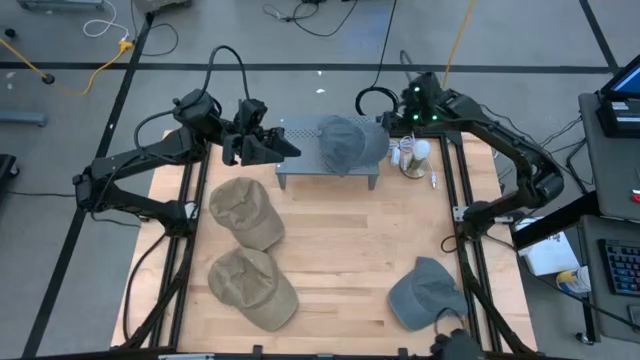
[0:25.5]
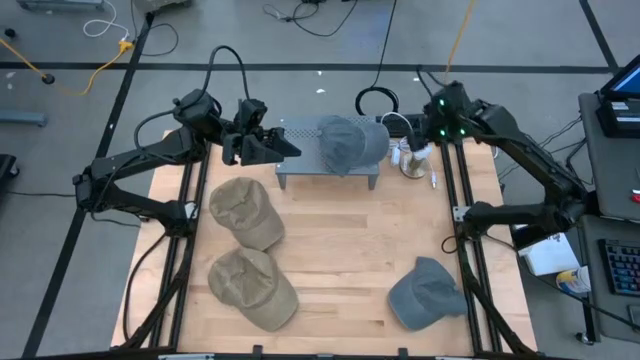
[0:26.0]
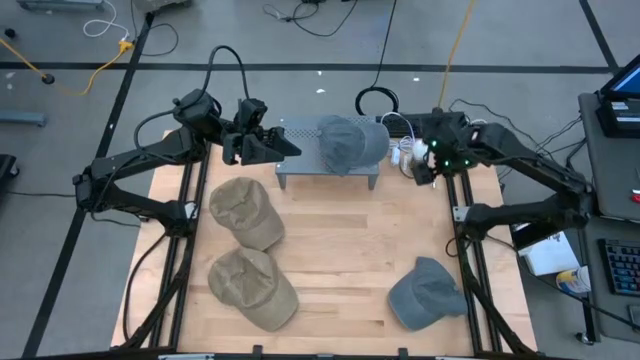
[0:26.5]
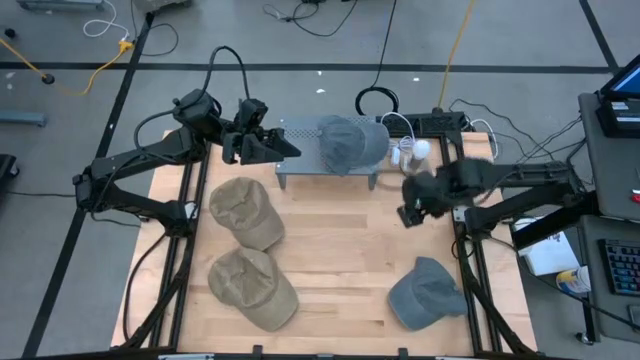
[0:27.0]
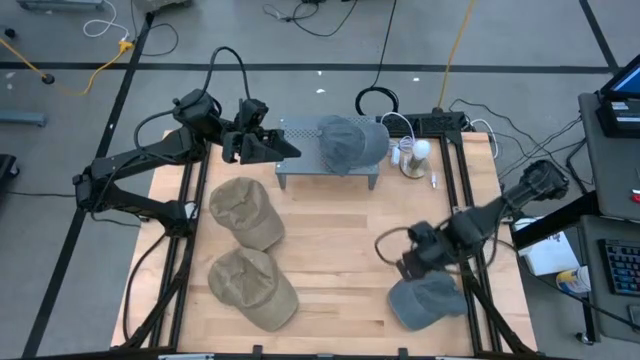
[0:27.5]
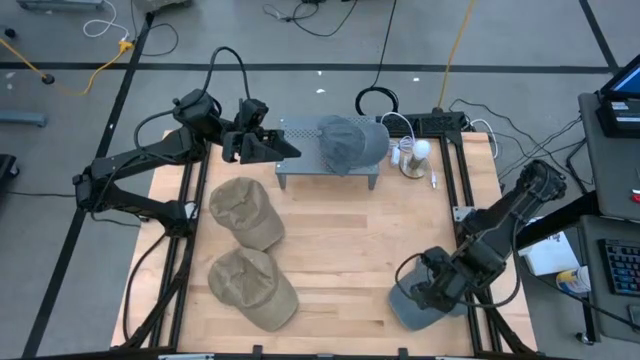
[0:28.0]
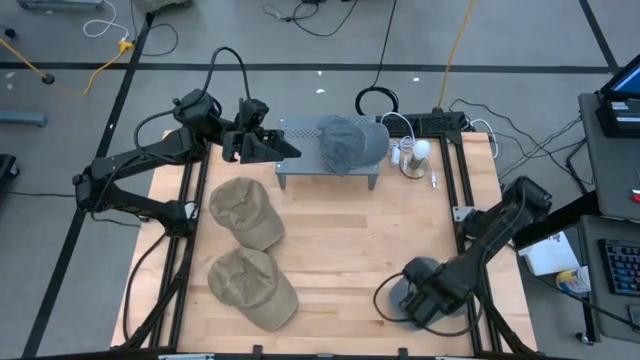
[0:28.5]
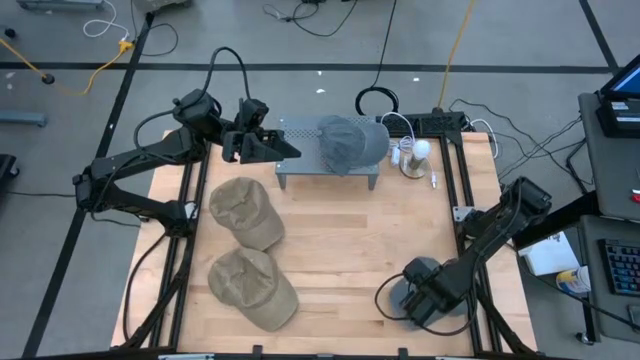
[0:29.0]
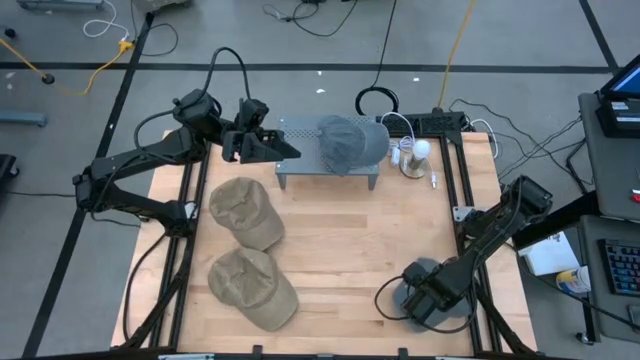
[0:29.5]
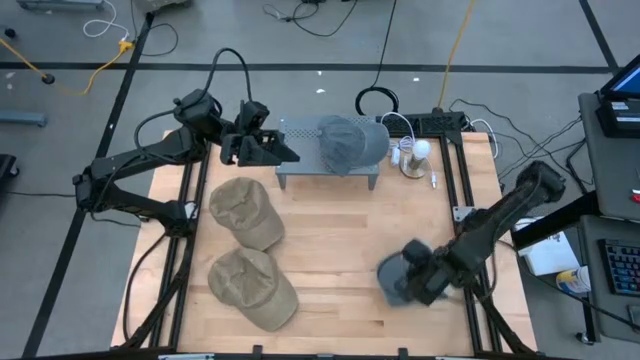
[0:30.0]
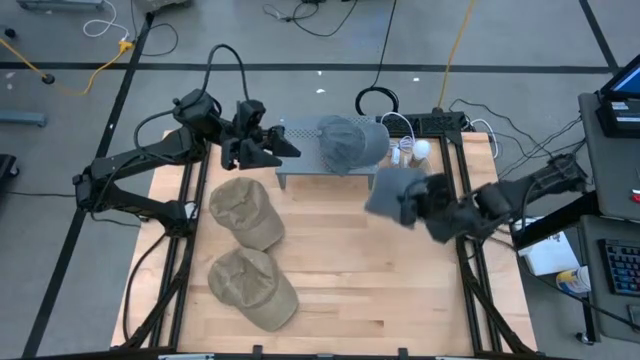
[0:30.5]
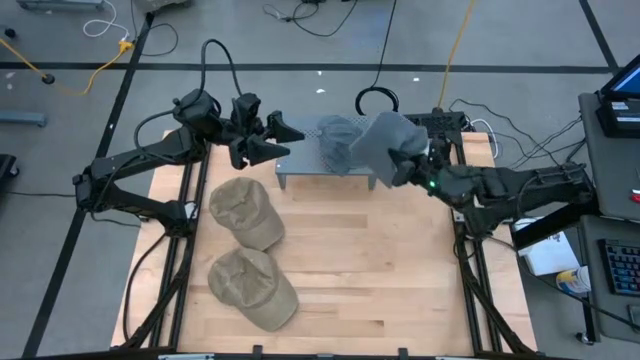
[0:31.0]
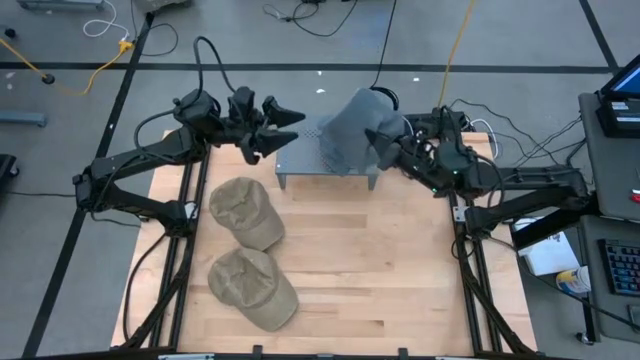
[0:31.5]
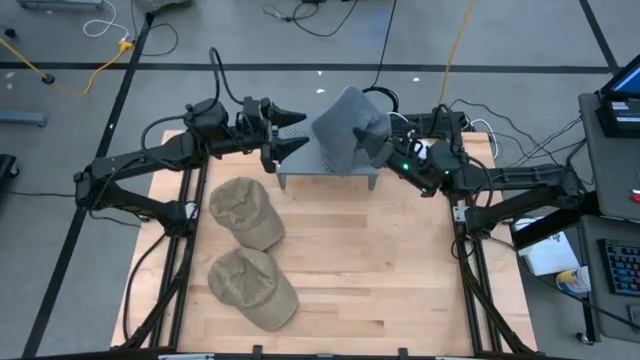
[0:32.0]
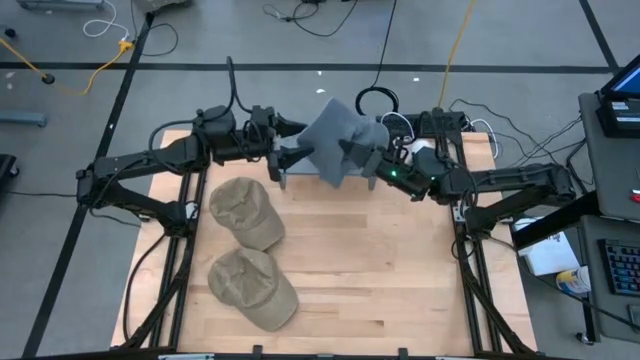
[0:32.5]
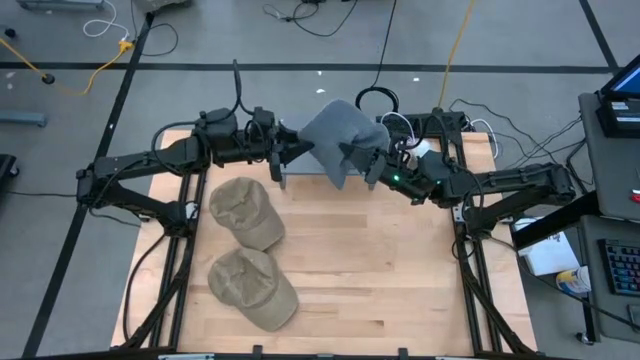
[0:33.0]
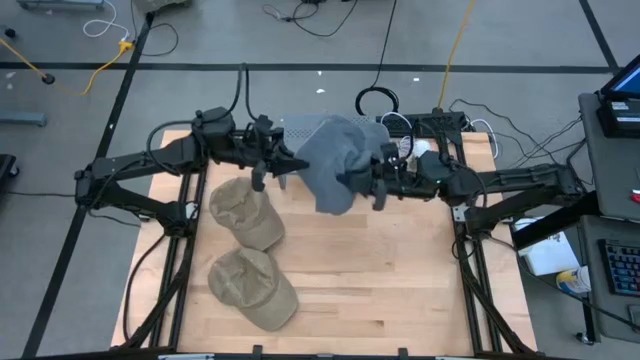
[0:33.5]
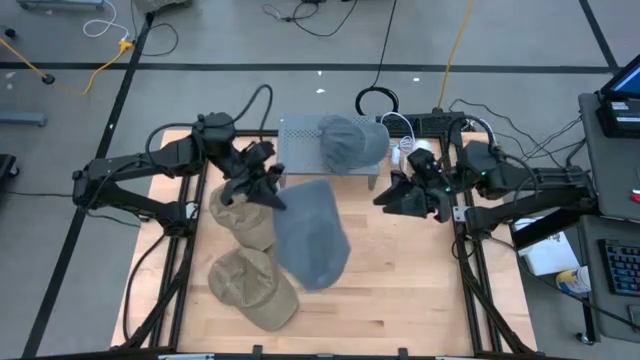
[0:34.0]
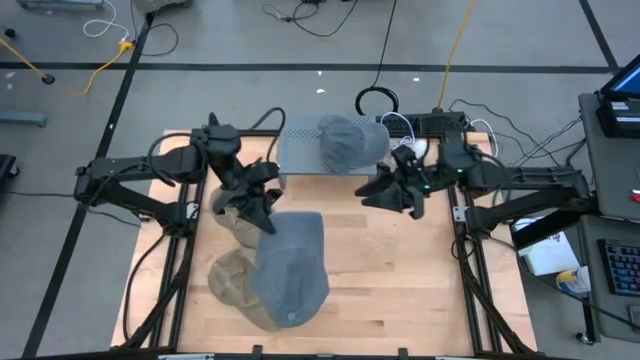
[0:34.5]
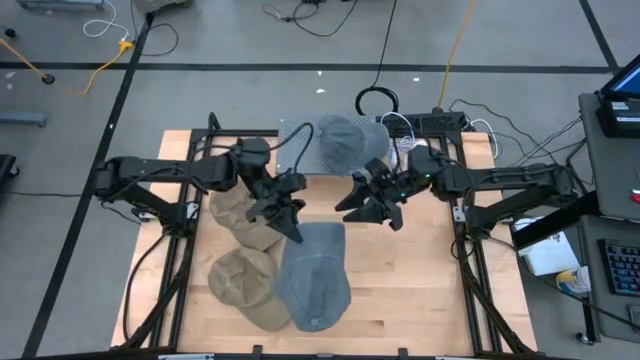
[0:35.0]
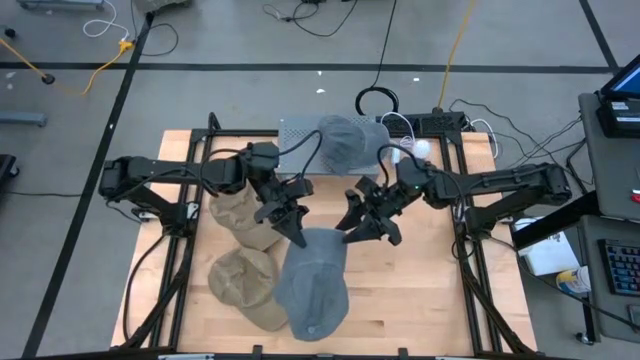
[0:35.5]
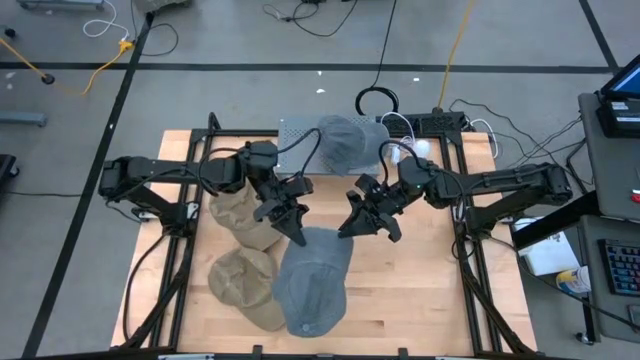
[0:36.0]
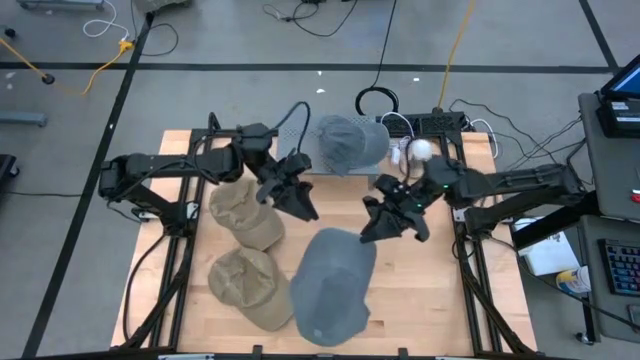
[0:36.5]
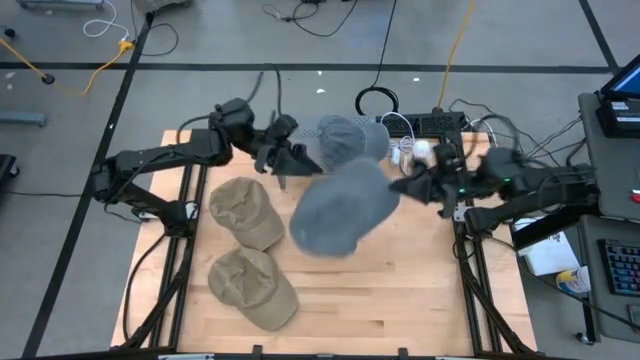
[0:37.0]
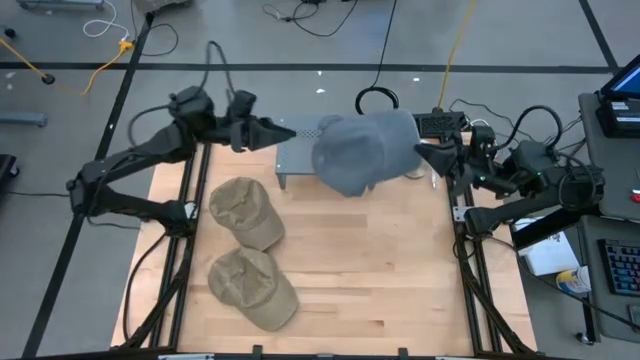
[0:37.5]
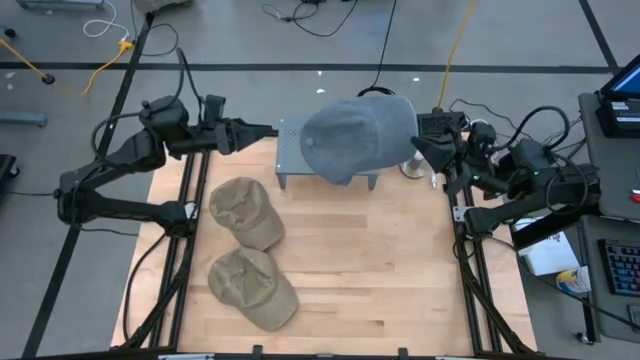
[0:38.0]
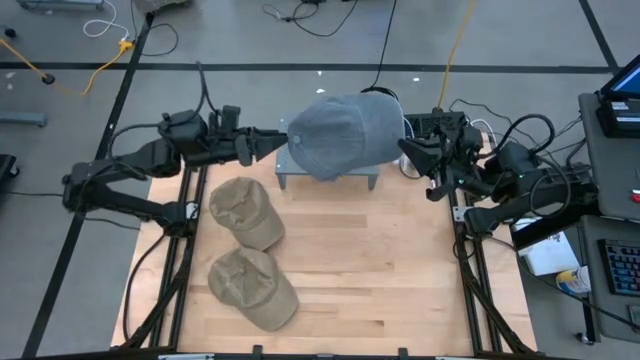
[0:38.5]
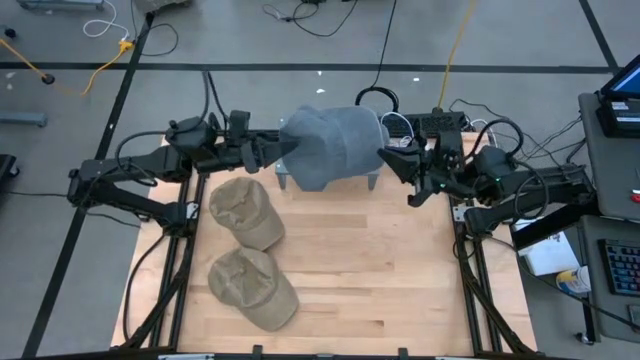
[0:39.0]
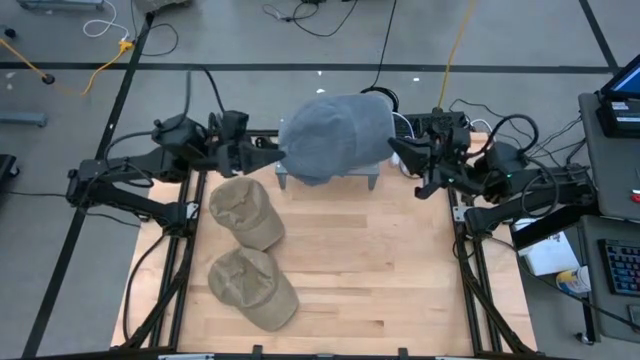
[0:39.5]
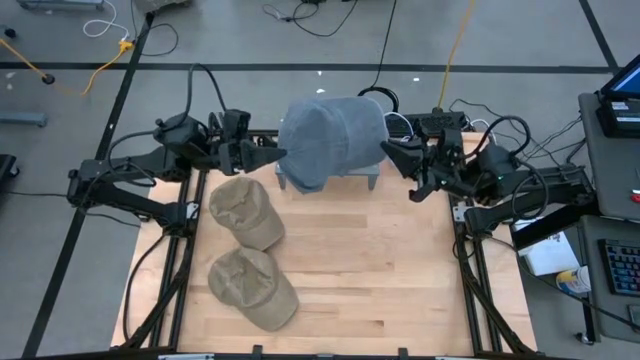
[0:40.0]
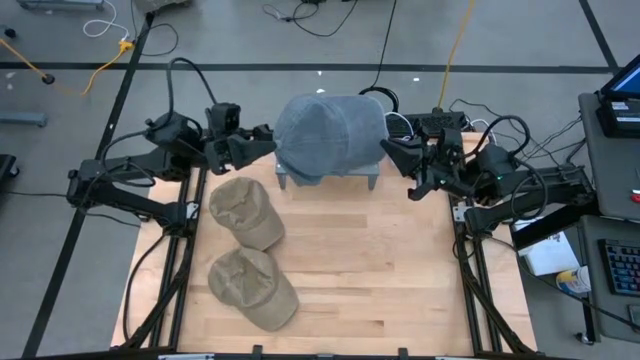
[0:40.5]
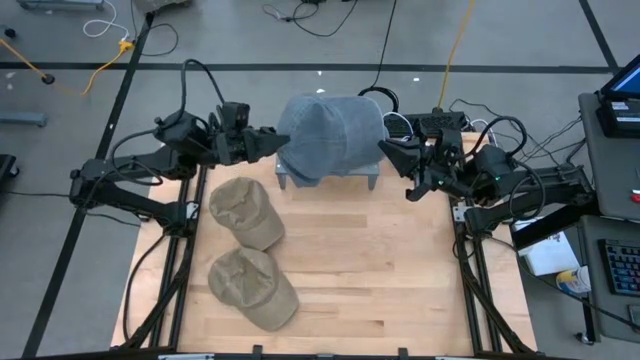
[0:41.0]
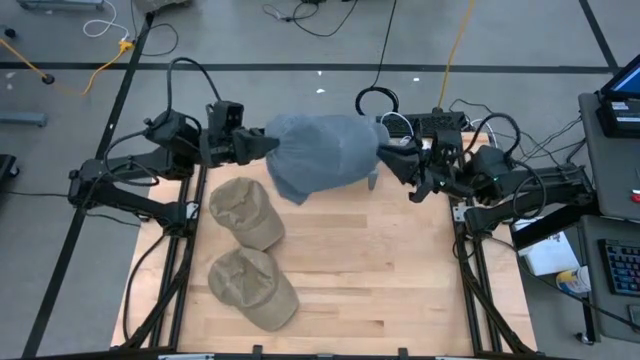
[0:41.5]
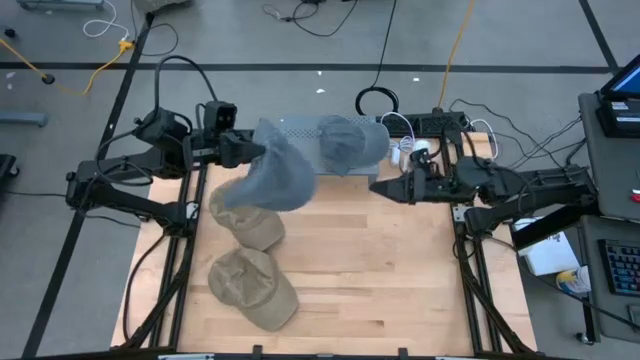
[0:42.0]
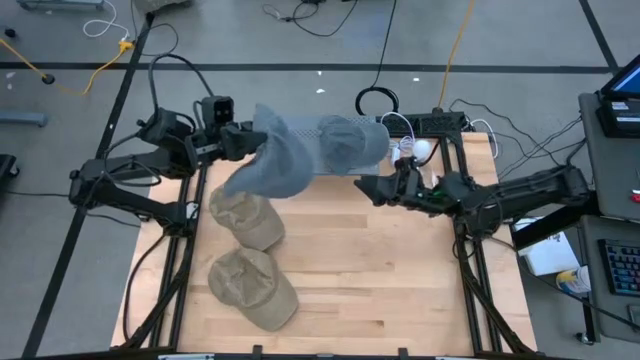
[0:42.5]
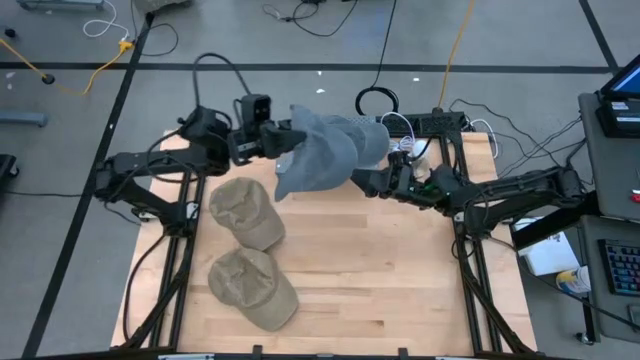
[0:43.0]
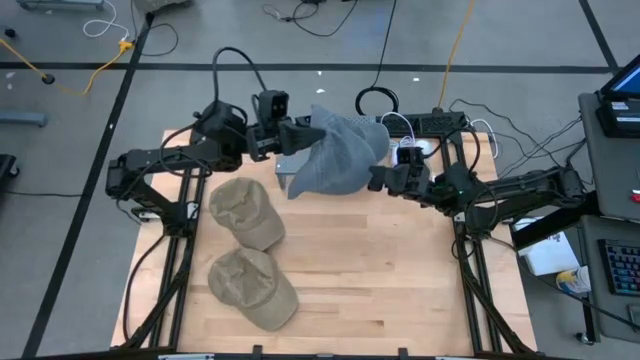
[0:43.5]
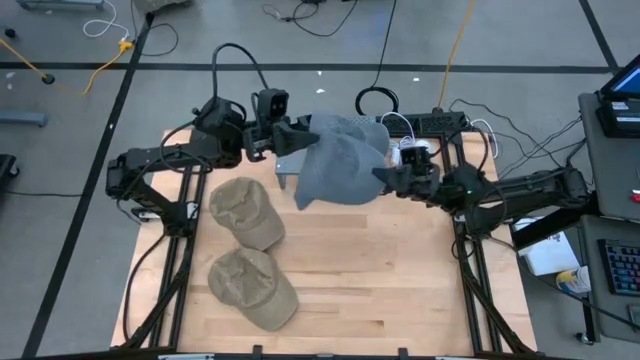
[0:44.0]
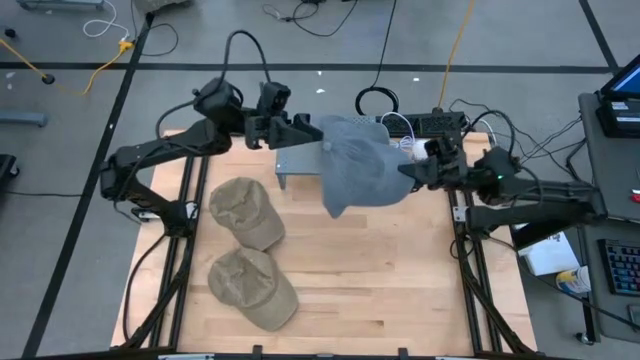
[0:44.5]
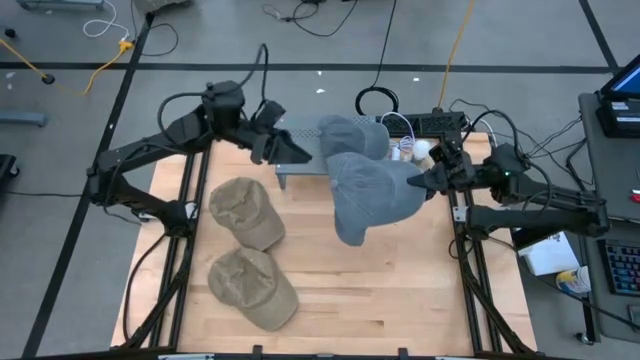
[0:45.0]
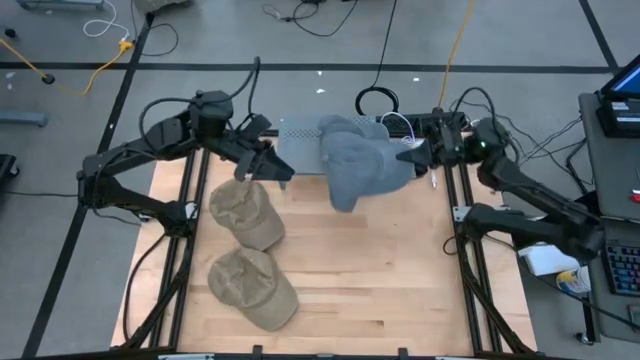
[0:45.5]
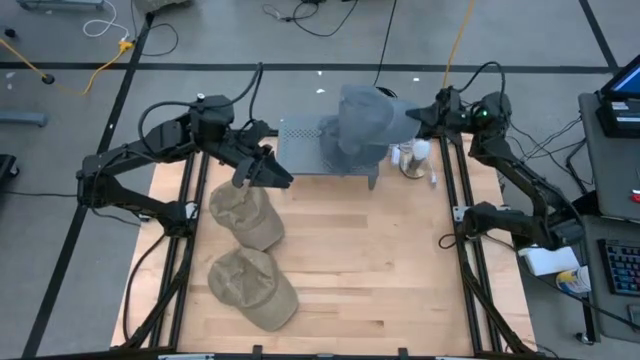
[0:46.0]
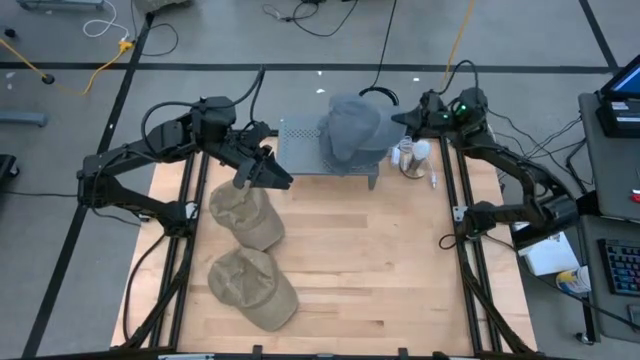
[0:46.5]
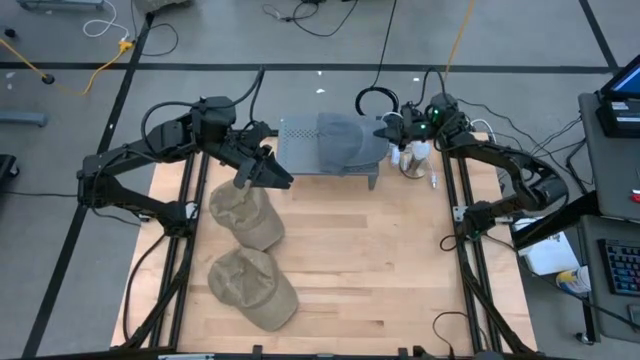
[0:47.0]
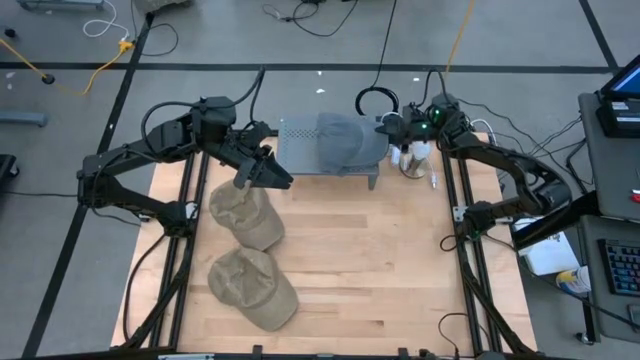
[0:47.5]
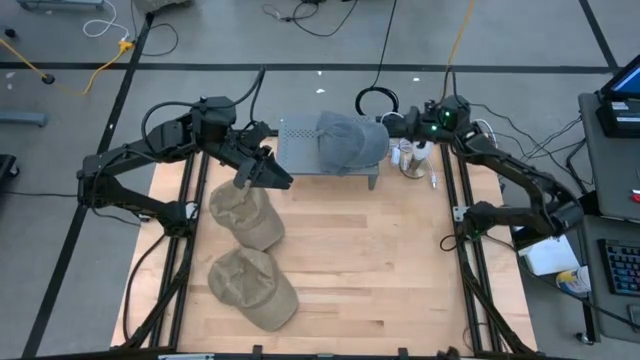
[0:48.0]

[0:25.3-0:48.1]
Task: Pick & Place hat
Stack the black cap on top of the black cap on the shelf
